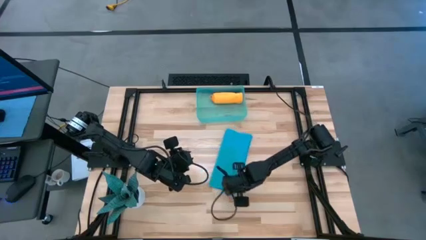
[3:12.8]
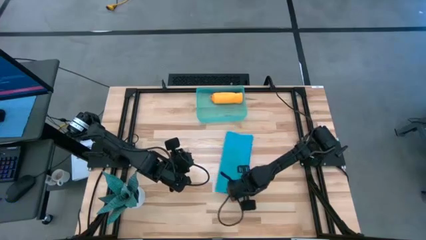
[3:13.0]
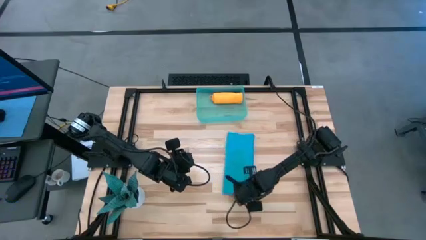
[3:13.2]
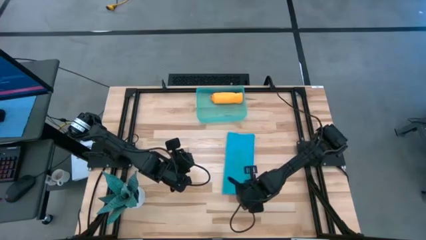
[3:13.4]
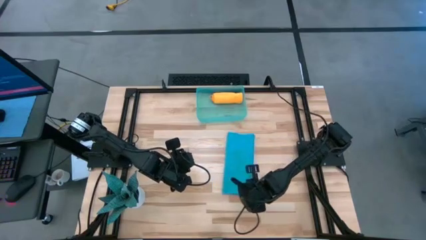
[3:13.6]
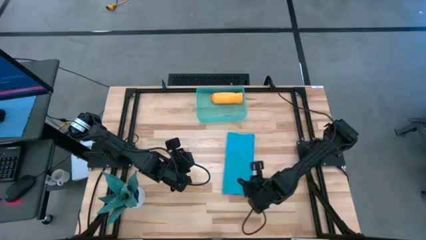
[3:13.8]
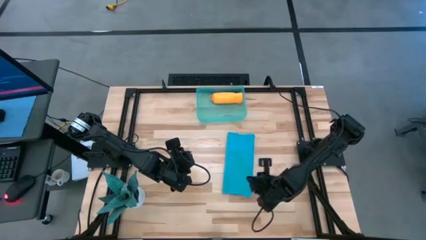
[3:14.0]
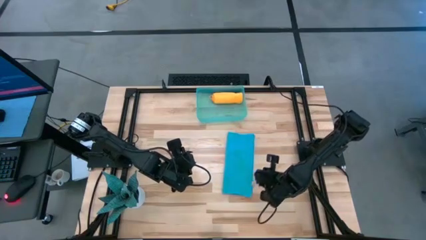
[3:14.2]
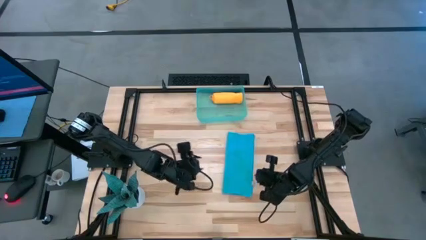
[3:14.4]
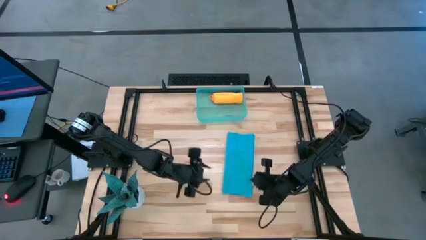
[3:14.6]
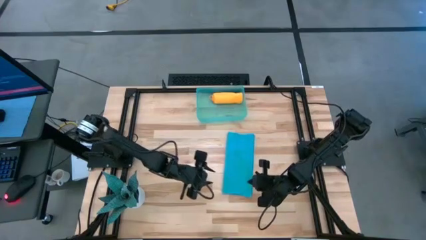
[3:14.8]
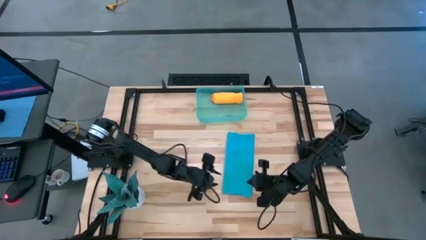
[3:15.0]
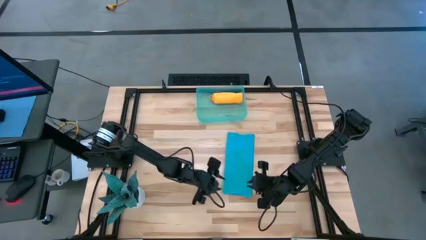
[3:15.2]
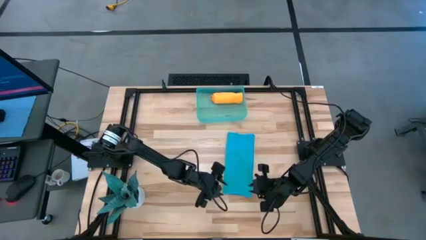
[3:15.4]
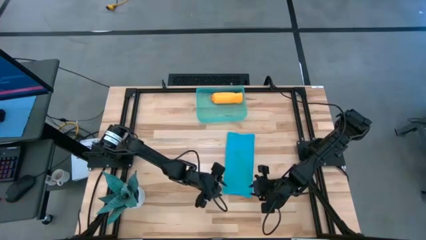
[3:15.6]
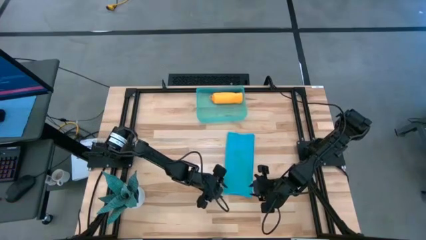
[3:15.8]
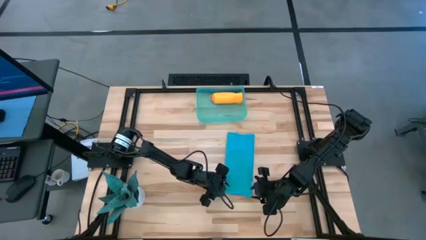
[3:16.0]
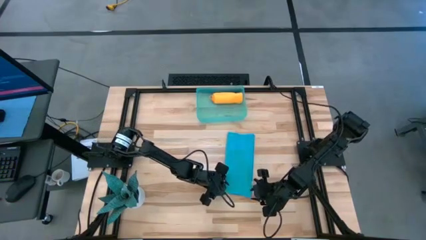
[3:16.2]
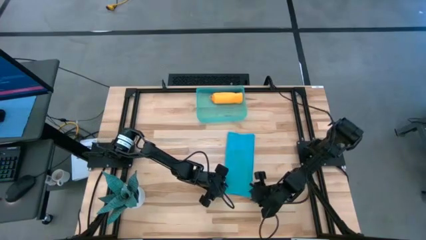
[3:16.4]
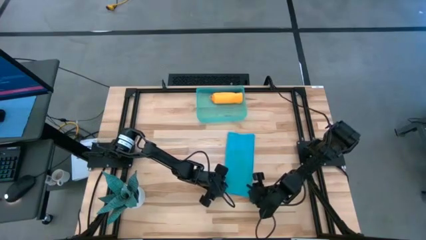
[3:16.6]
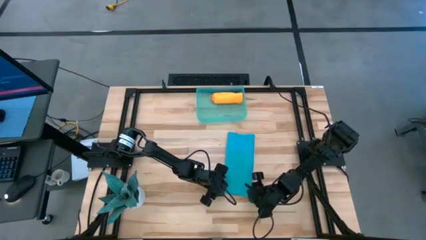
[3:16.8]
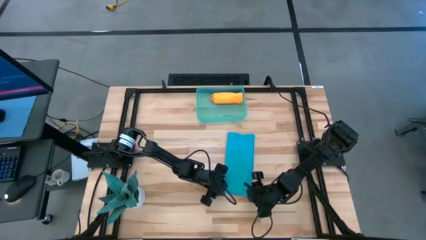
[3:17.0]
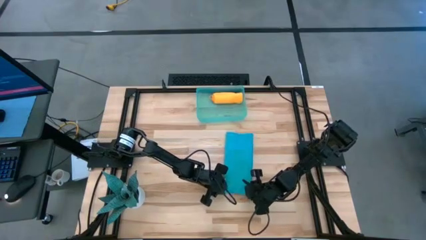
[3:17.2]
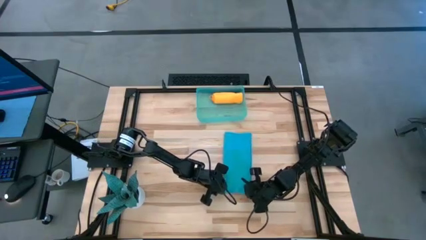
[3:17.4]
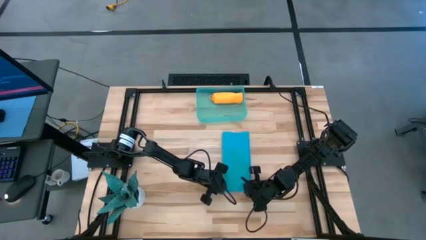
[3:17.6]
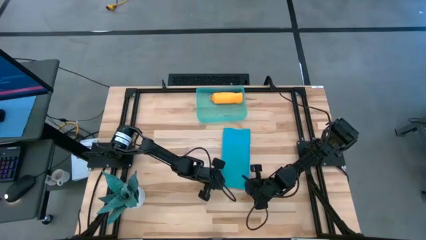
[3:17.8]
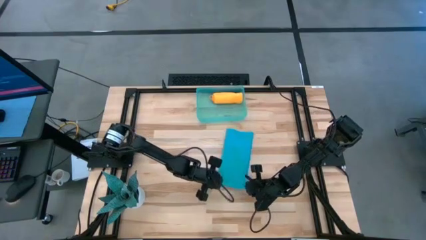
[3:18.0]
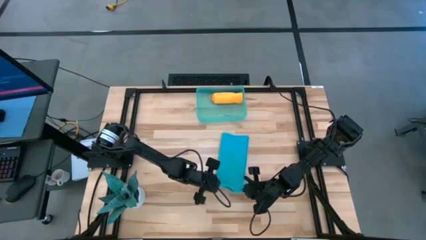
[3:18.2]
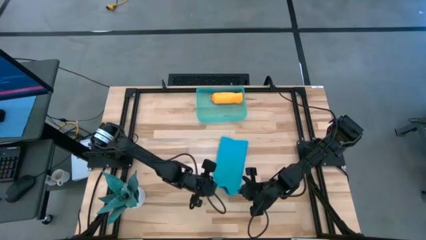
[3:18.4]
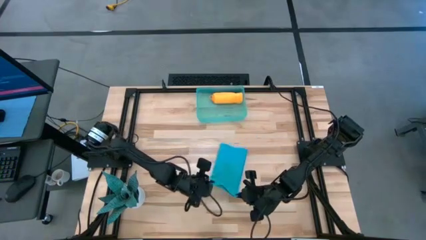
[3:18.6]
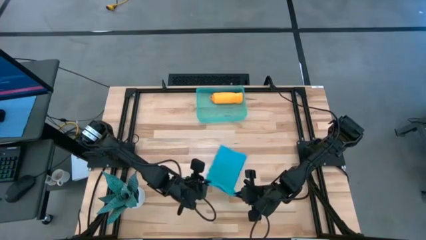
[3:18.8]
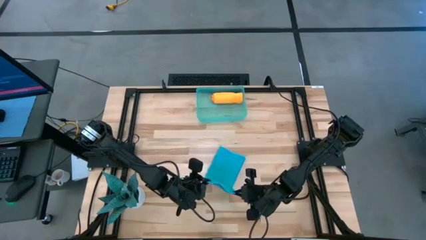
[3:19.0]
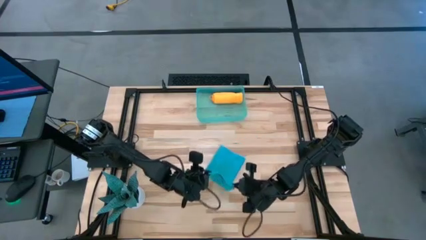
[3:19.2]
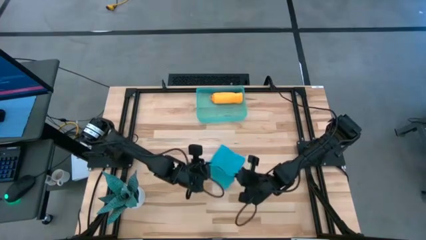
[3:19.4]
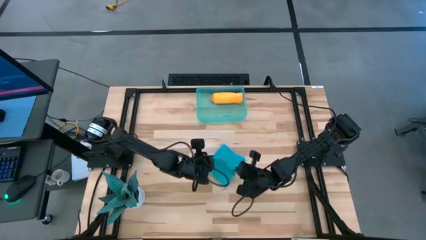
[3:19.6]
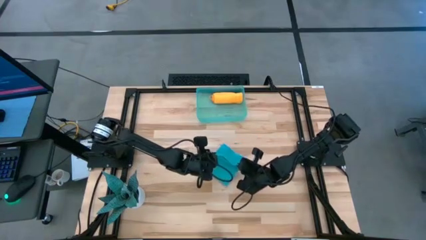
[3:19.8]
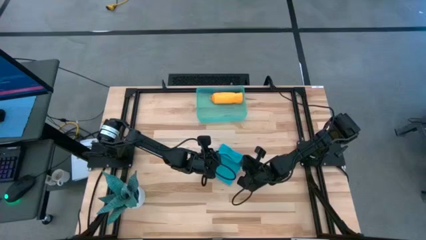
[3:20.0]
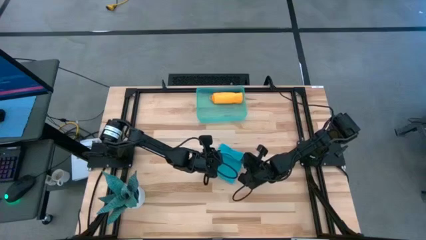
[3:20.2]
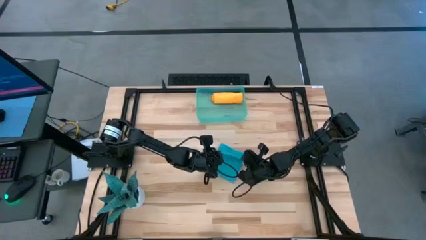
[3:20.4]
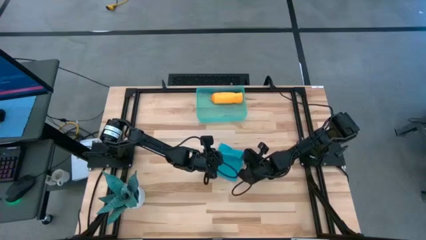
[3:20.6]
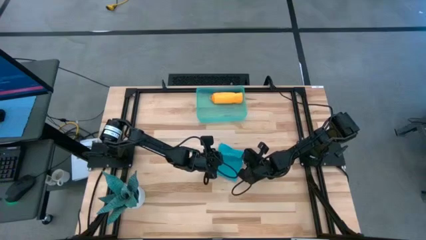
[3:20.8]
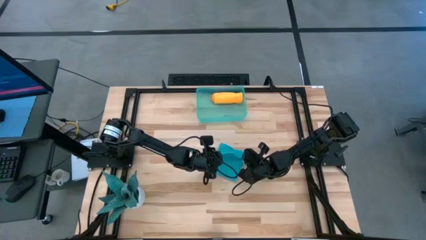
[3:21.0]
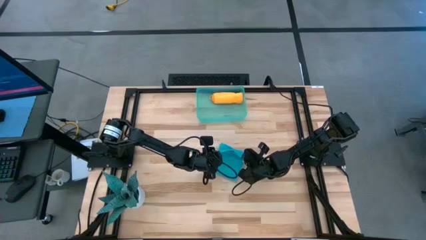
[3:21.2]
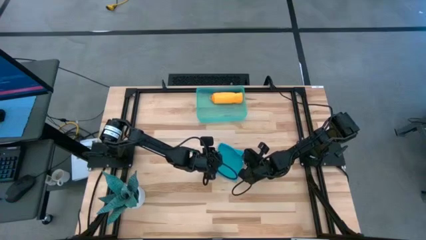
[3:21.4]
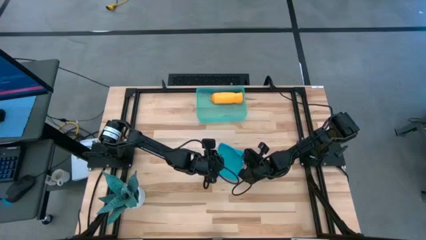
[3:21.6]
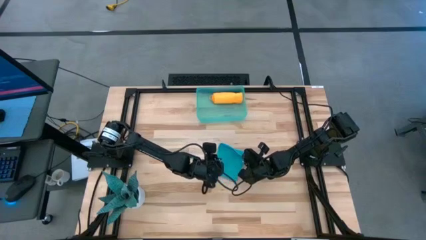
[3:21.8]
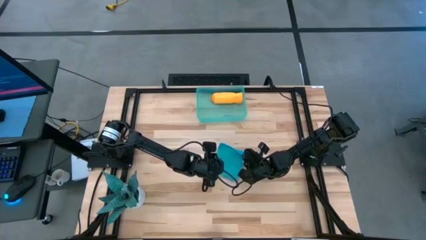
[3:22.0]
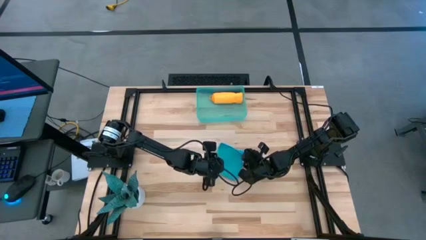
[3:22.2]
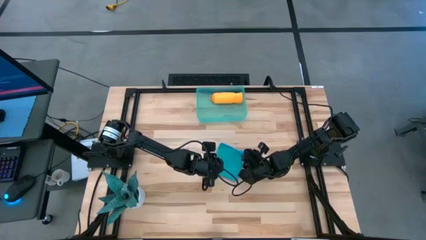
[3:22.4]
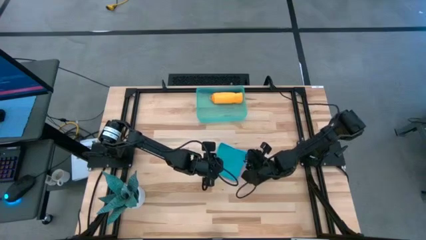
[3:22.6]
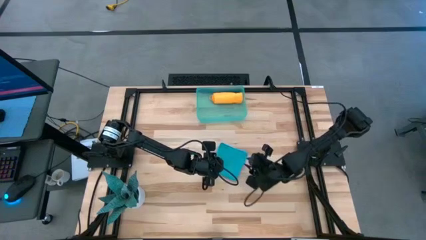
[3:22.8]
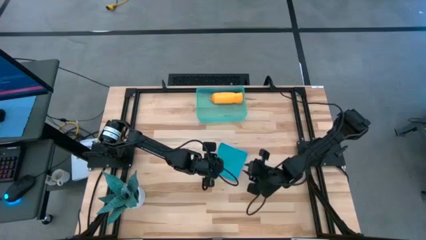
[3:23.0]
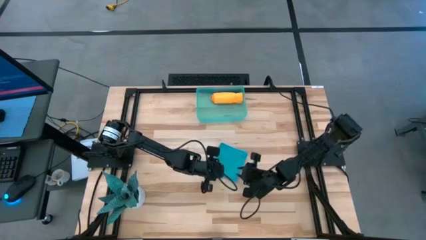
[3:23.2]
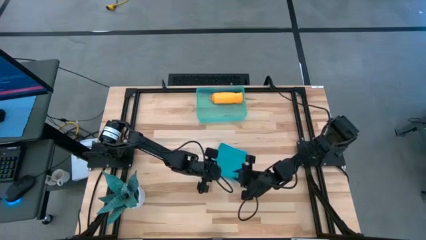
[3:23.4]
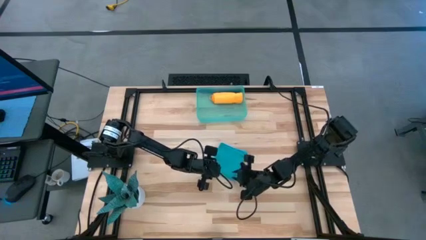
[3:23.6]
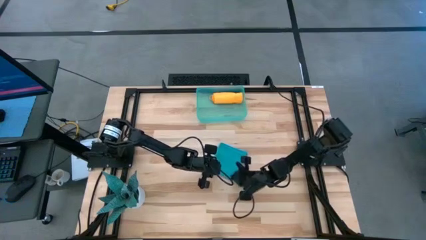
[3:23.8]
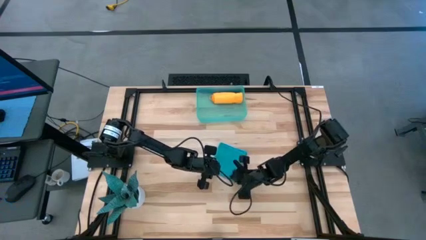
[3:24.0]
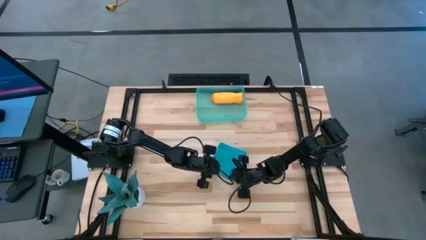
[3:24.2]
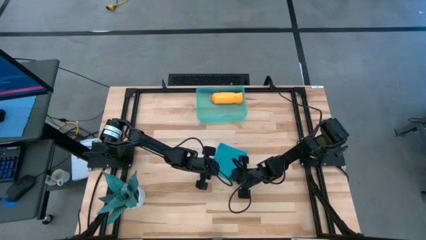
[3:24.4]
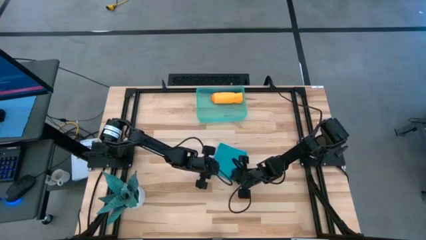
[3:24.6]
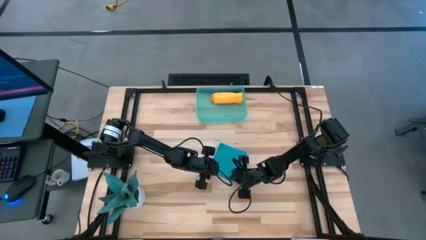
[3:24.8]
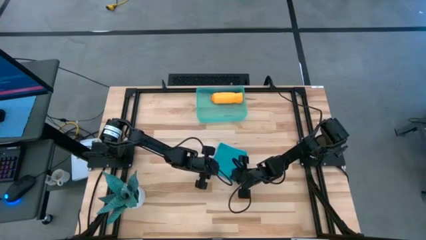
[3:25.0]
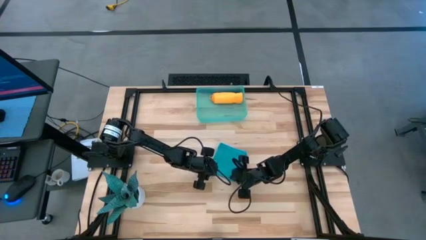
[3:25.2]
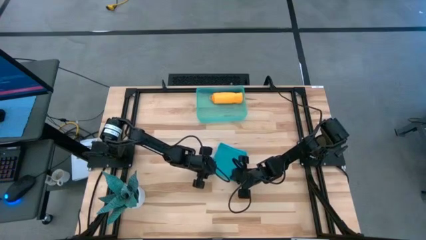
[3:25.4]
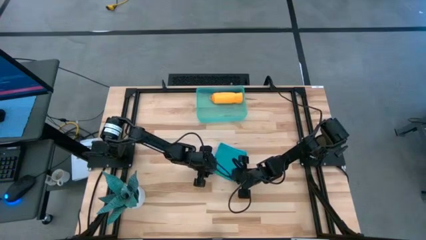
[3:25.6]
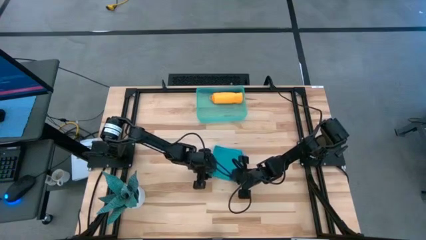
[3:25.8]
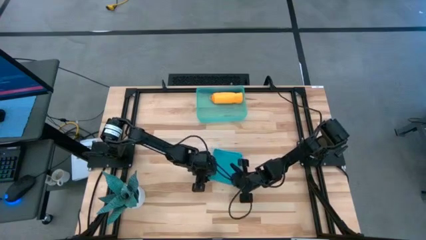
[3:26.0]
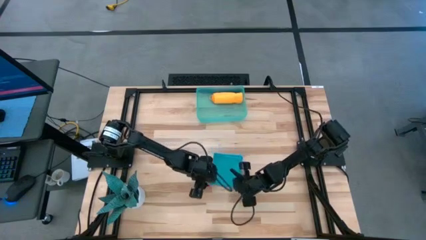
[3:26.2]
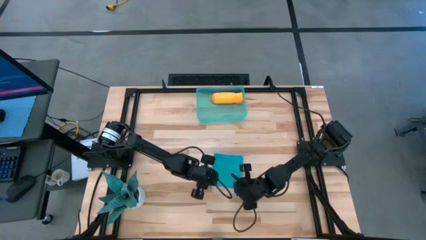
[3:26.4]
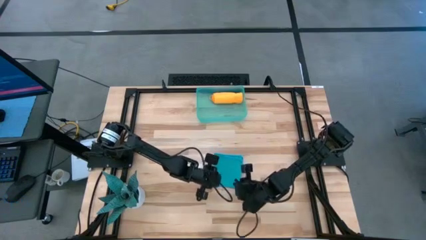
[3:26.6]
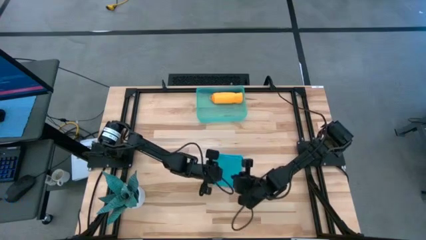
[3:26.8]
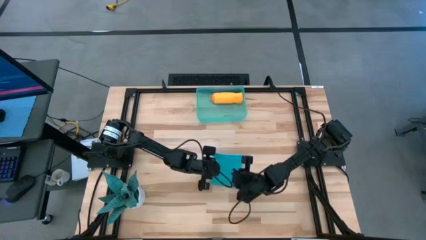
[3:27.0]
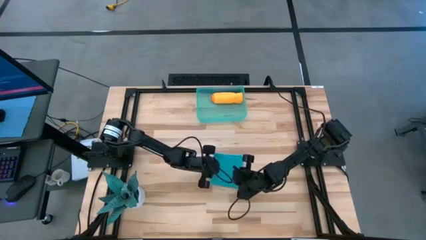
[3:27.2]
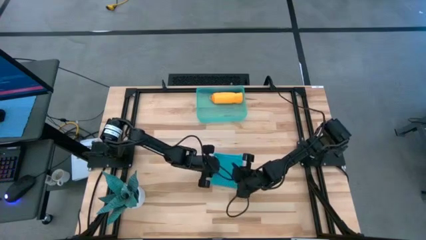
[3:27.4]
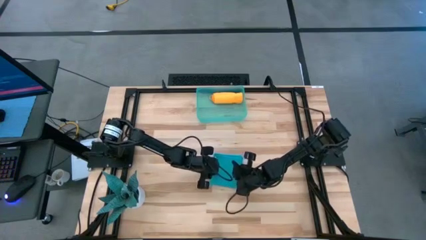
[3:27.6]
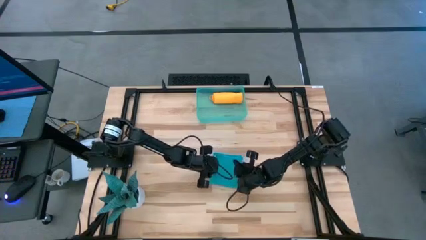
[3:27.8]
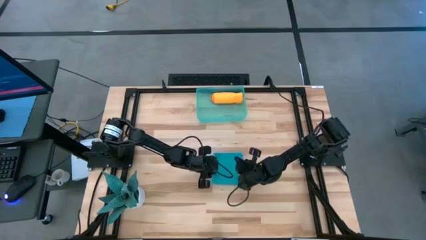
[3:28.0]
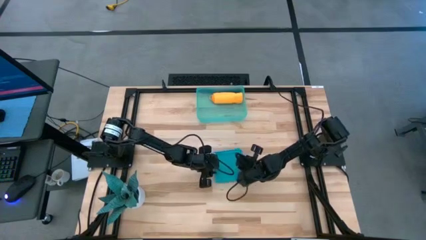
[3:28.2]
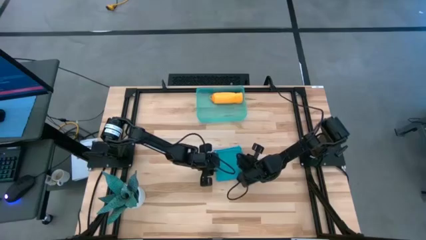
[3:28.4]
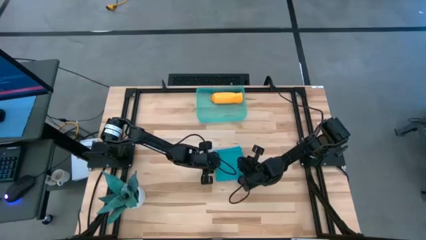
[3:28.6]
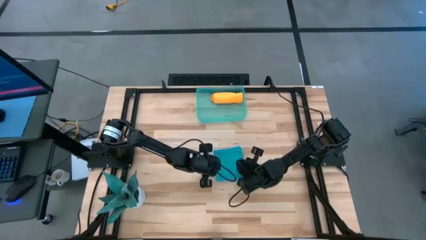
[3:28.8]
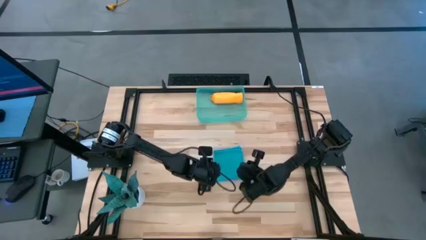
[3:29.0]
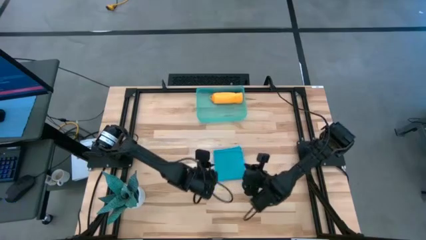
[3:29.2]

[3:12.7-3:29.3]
Task: Roll microfiber towels into tight, uniform cylinder then place into a basket
Roll the blue microfiber cloth on the table
